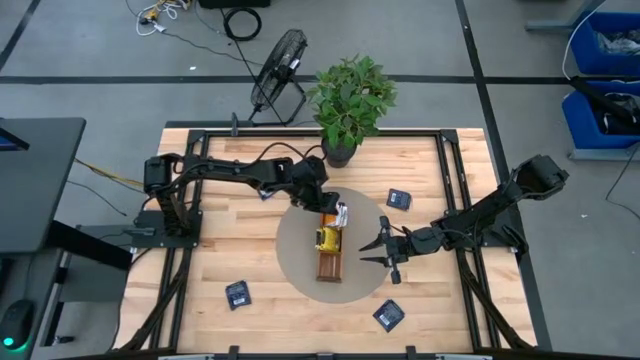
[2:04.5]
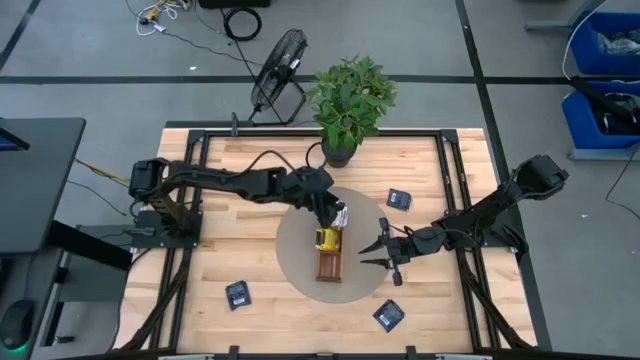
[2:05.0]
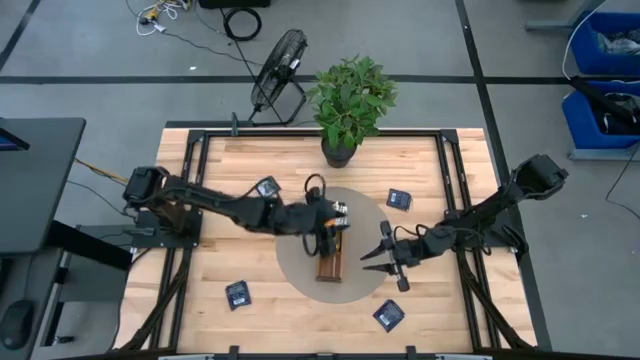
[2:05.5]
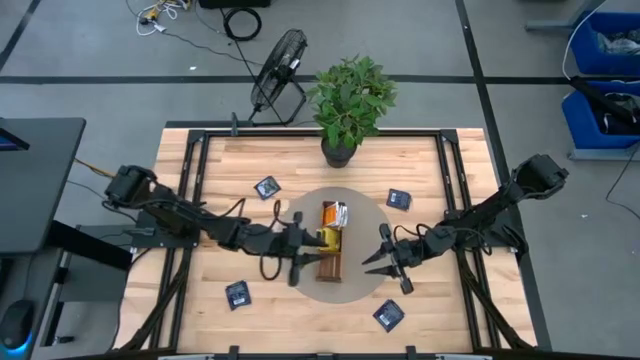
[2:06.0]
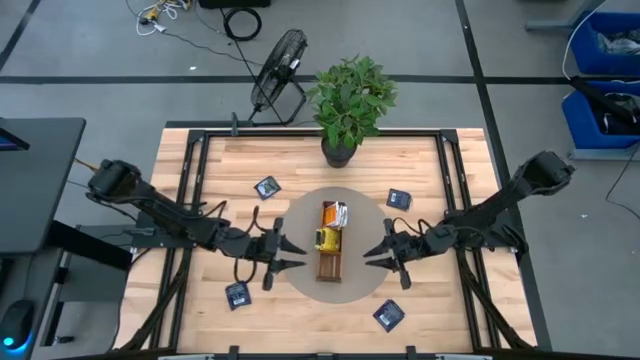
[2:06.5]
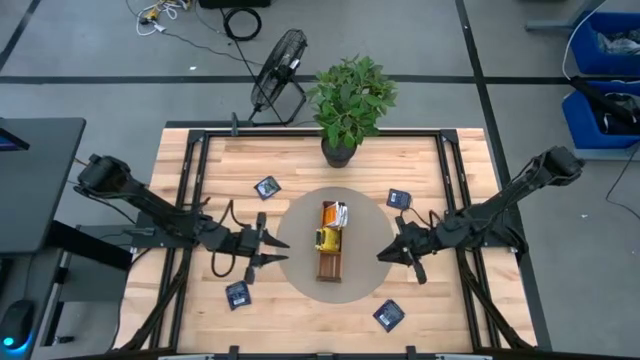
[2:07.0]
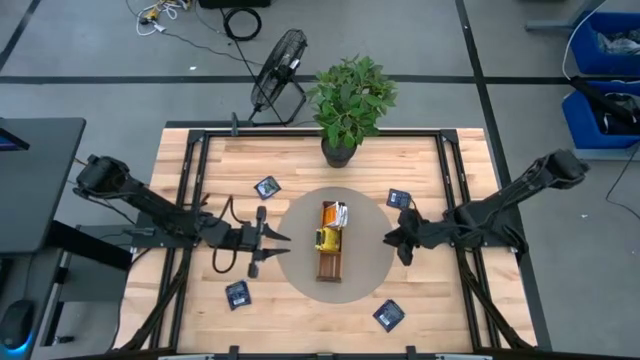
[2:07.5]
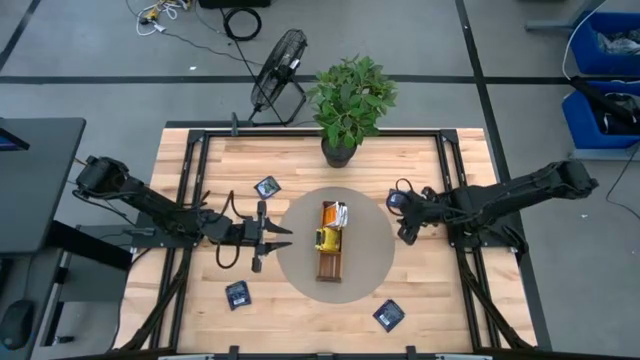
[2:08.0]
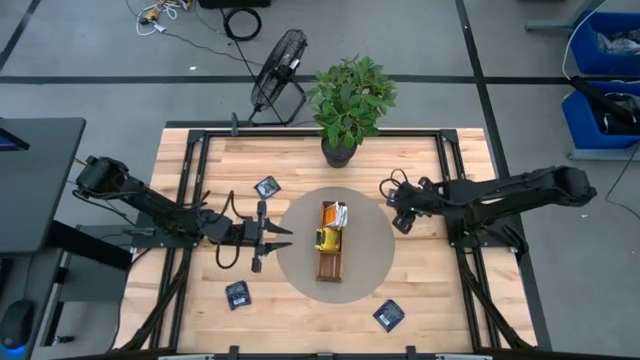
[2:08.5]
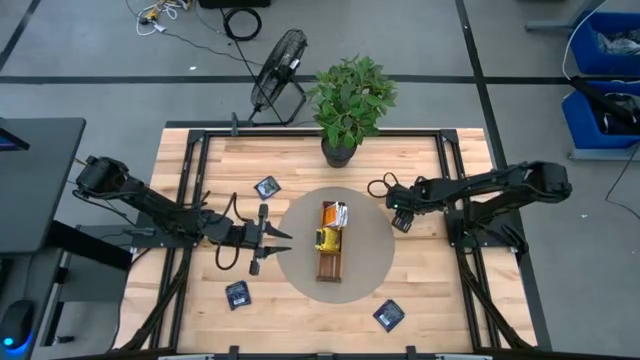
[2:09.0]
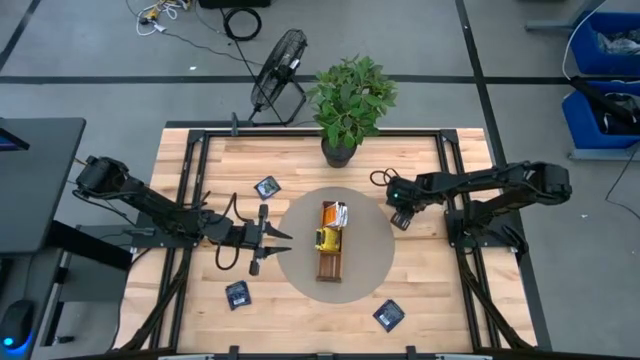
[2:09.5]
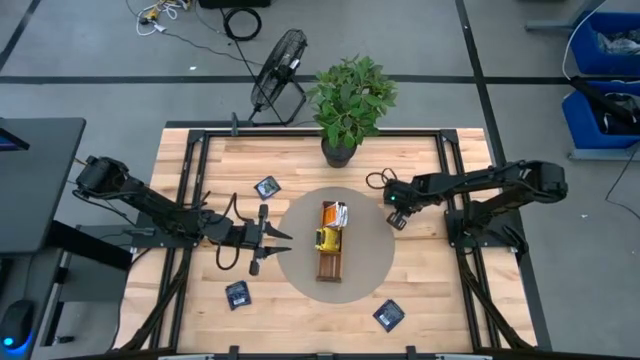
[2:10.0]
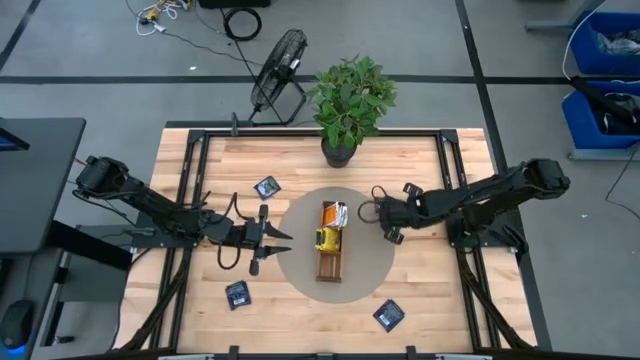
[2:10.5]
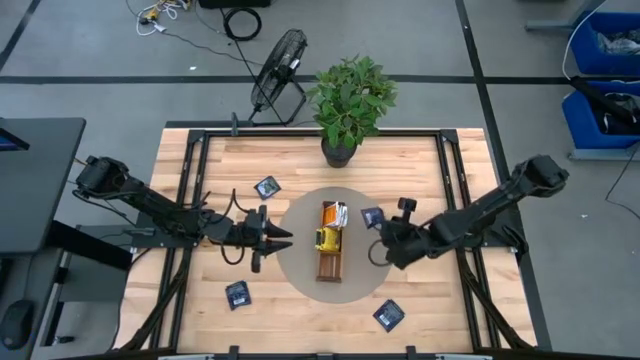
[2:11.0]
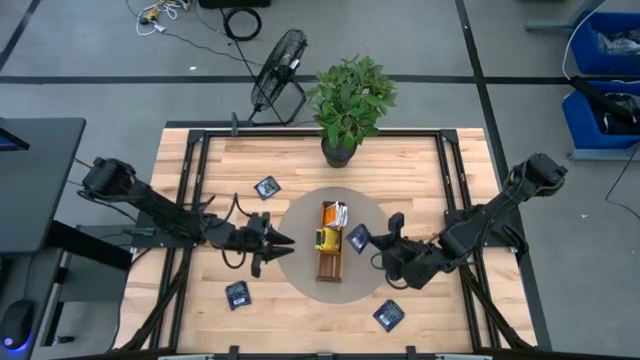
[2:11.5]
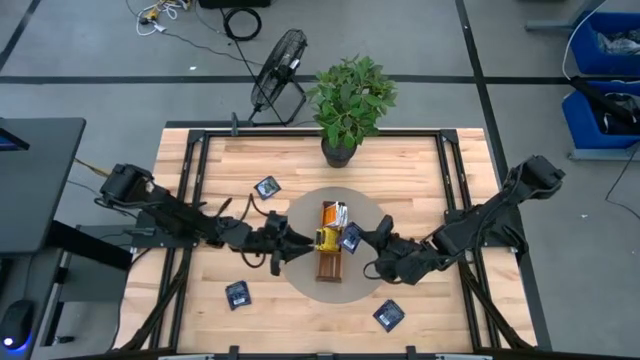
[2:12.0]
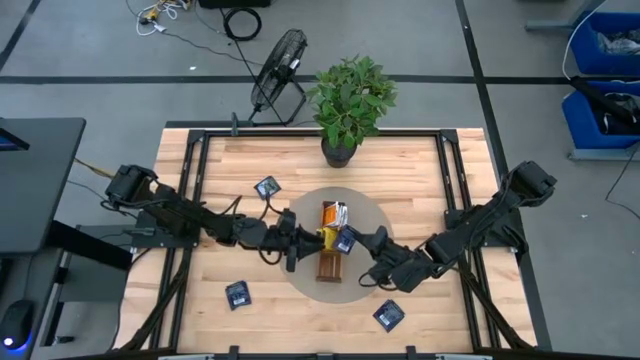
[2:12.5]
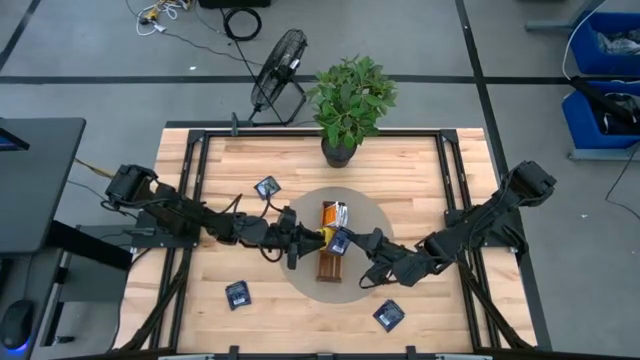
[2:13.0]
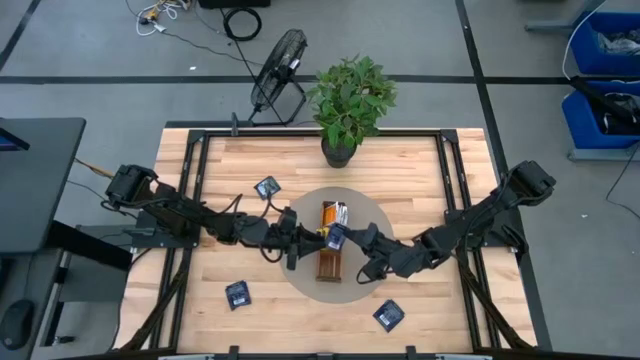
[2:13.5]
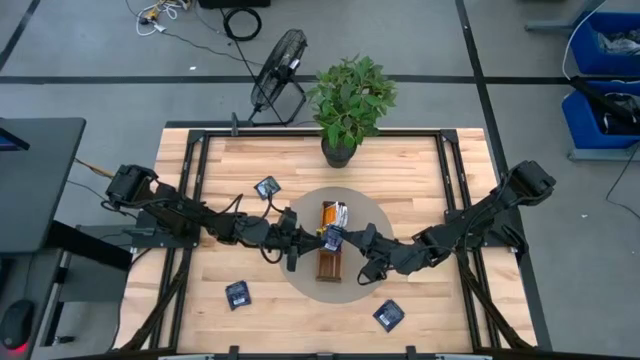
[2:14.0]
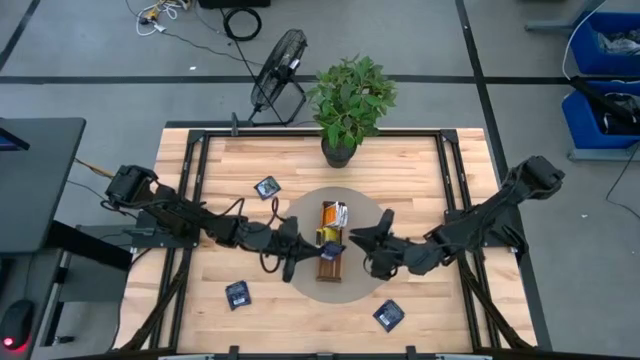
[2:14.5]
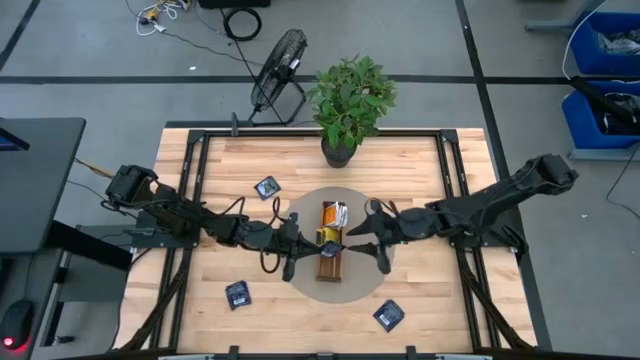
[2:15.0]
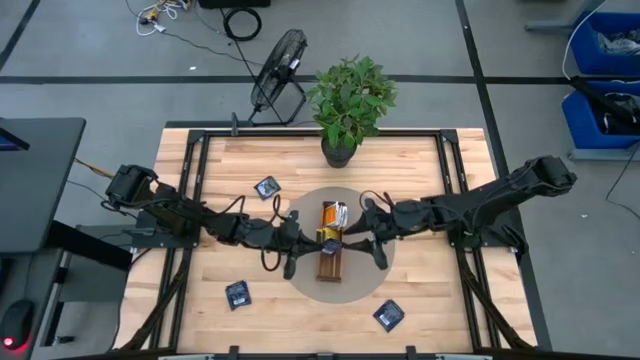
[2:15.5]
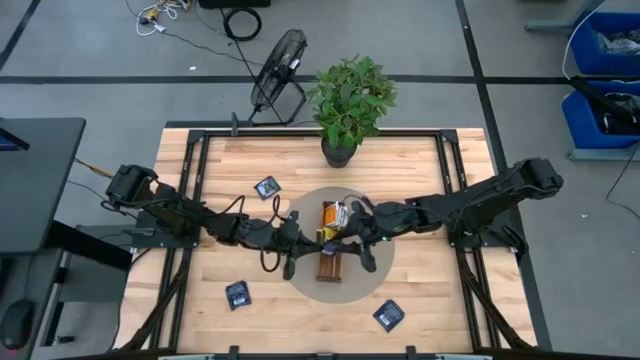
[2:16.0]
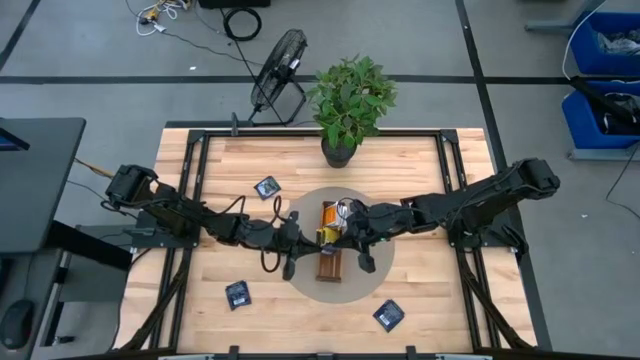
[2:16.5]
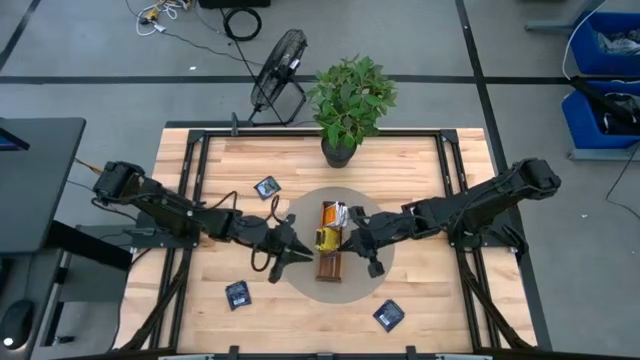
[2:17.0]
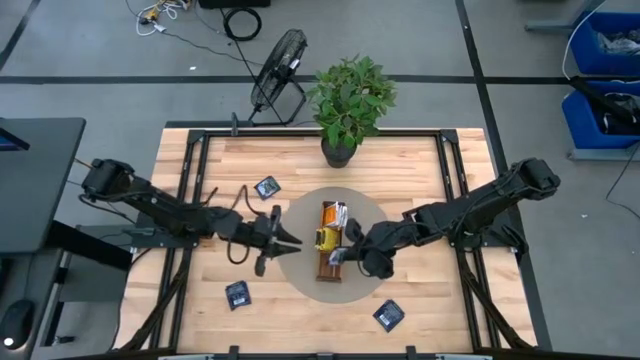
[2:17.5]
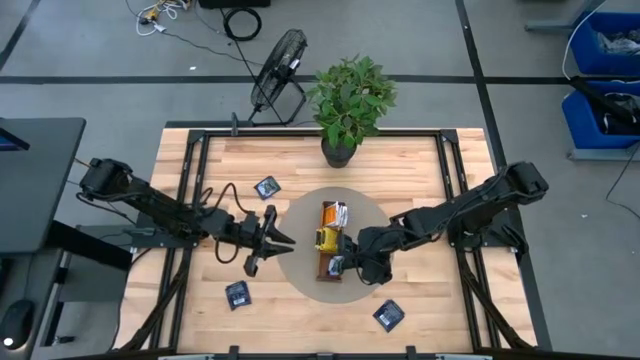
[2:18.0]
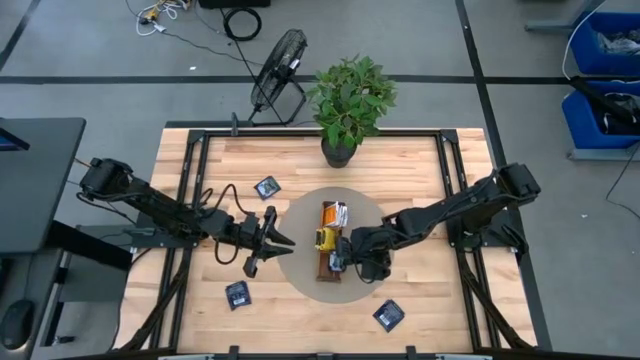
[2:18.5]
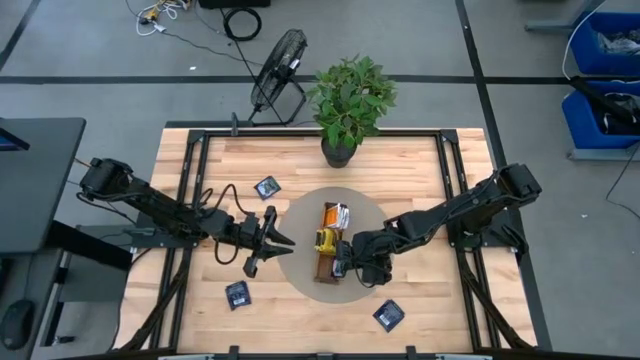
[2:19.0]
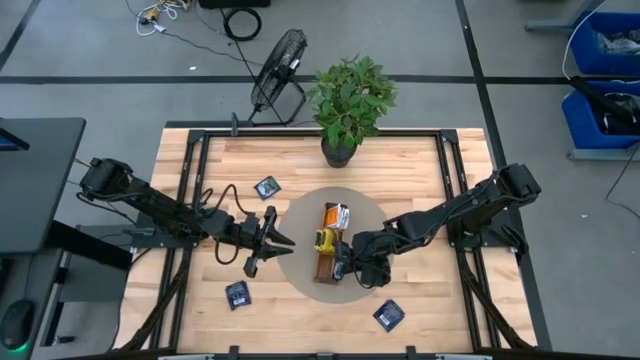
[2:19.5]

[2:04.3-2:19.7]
Task: Pick & Place Tea
Put the purple tea bag into the bottom compartment of the bottom section wooden organizer

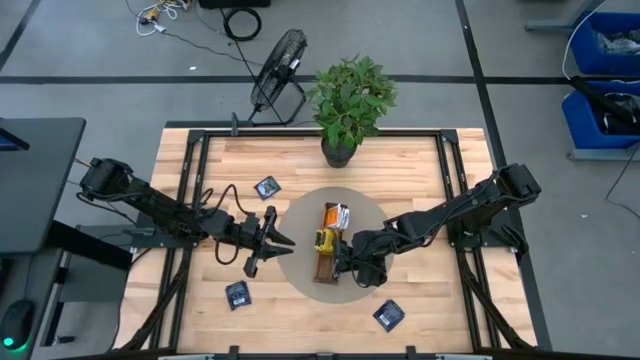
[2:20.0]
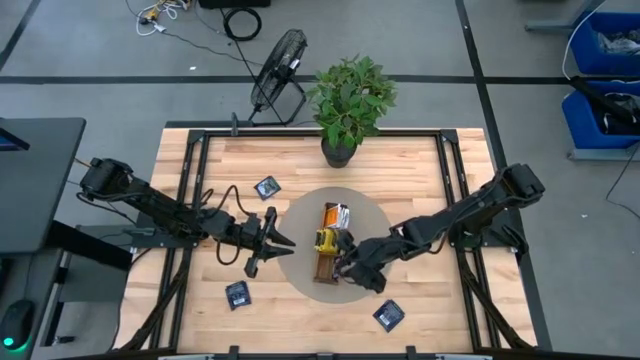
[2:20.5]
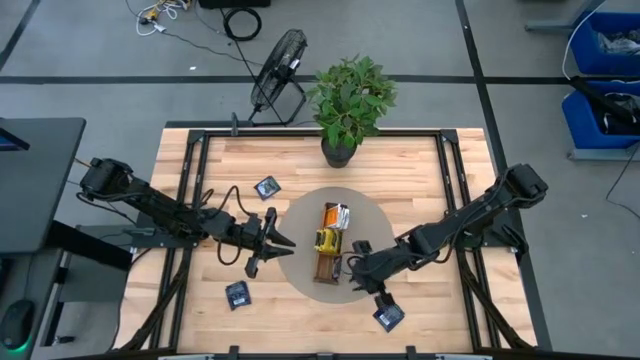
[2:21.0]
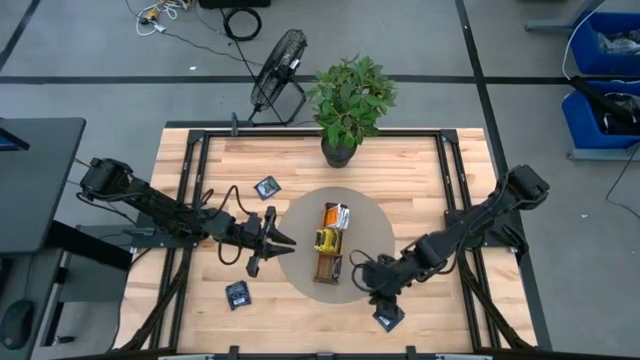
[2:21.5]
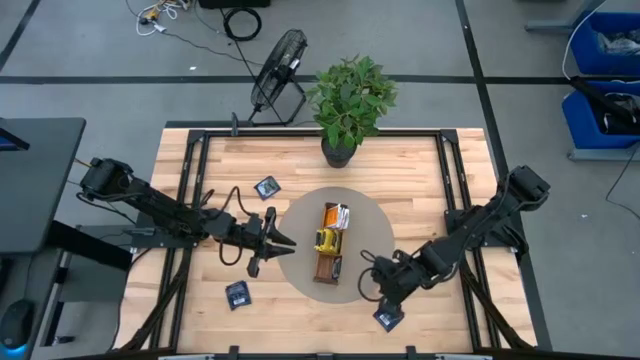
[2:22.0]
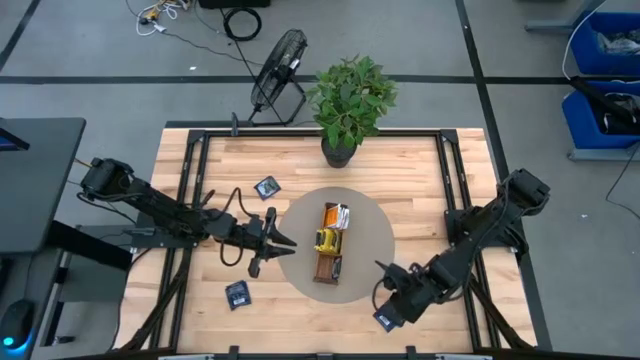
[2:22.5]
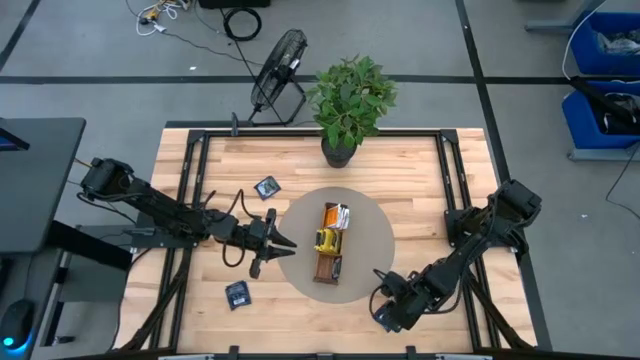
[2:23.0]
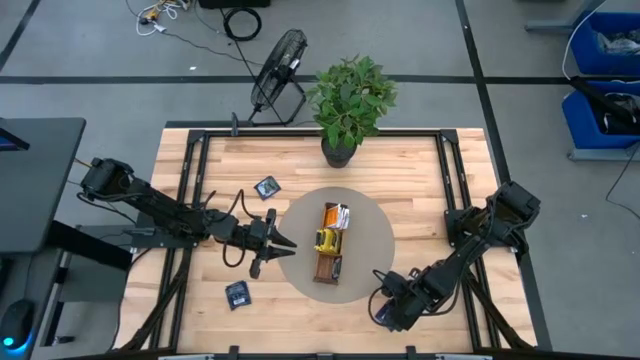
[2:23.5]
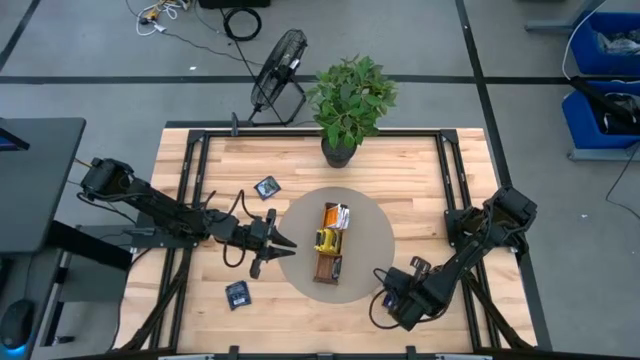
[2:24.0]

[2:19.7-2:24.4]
Put the purple tea bag into the bottom compartment of the bottom section wooden organizer
